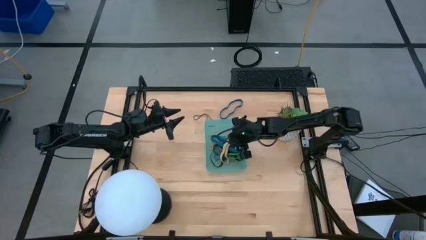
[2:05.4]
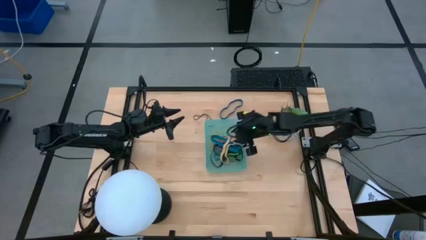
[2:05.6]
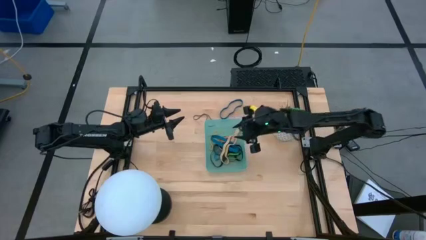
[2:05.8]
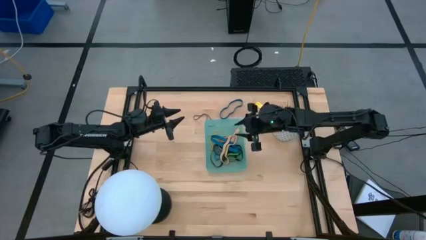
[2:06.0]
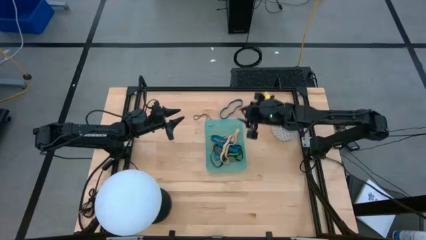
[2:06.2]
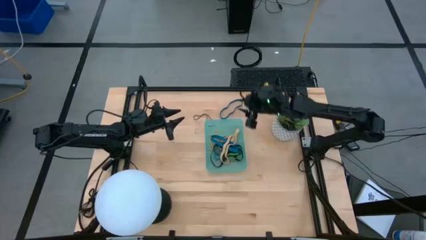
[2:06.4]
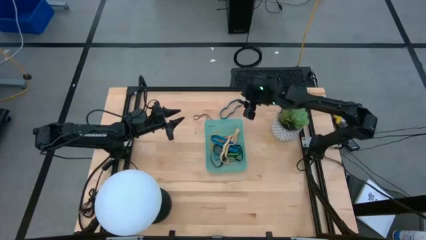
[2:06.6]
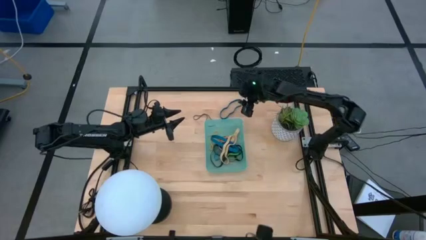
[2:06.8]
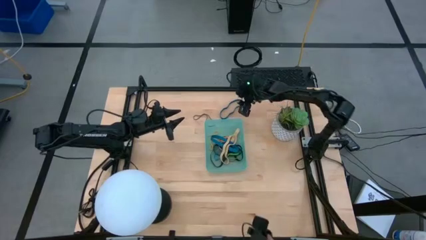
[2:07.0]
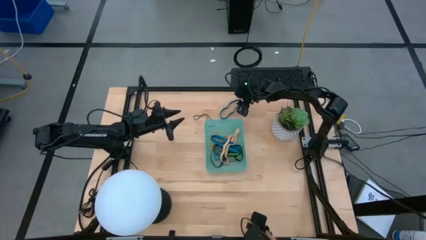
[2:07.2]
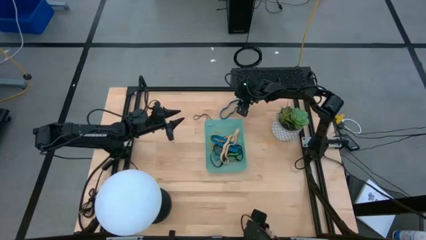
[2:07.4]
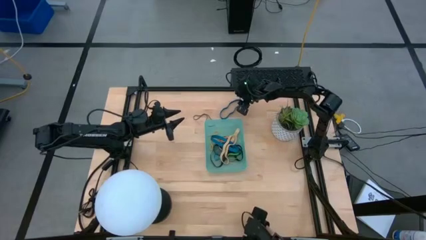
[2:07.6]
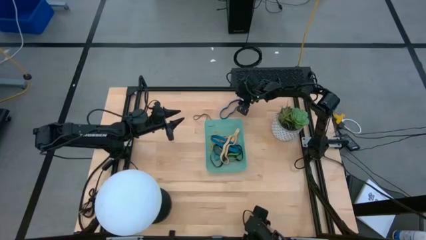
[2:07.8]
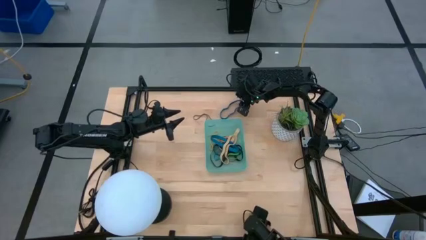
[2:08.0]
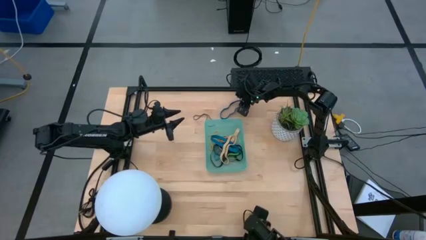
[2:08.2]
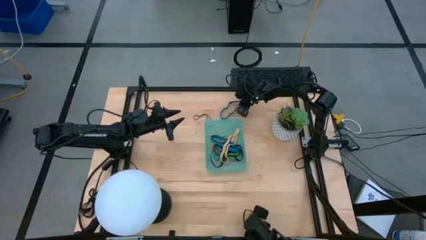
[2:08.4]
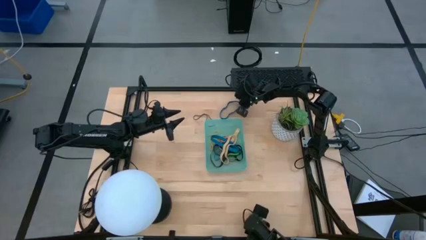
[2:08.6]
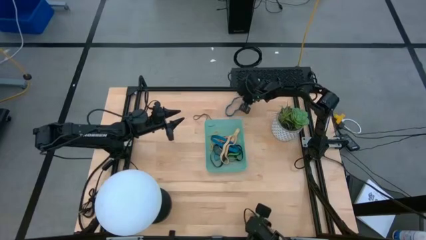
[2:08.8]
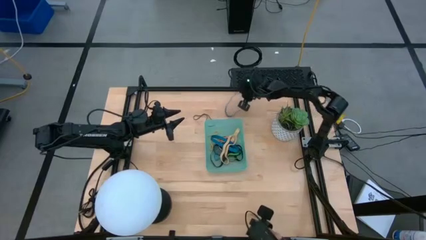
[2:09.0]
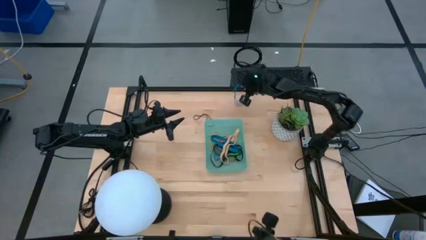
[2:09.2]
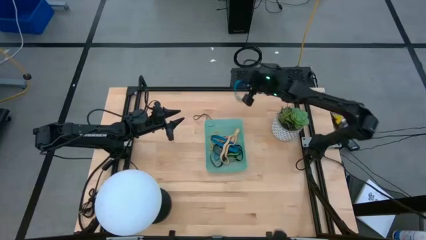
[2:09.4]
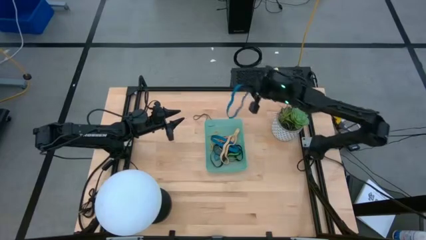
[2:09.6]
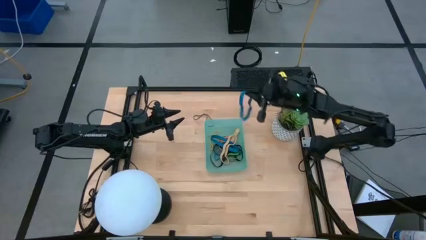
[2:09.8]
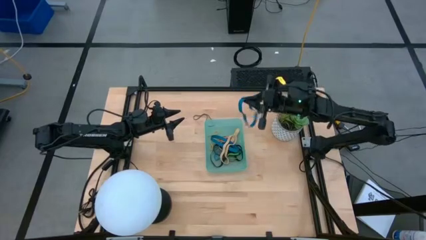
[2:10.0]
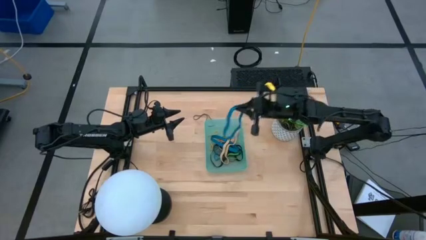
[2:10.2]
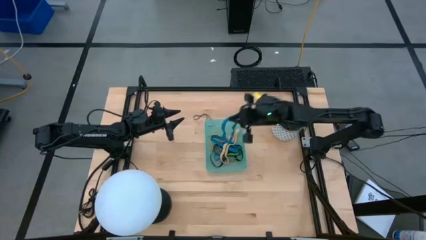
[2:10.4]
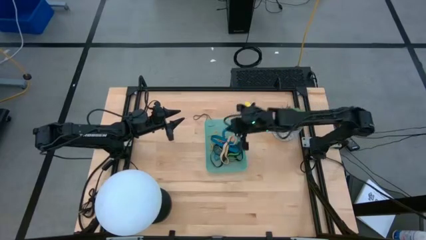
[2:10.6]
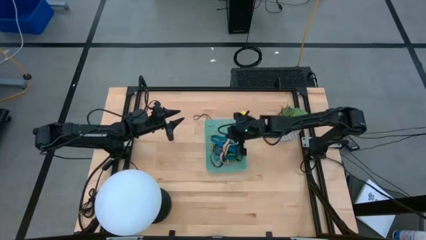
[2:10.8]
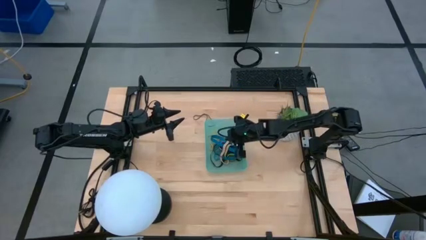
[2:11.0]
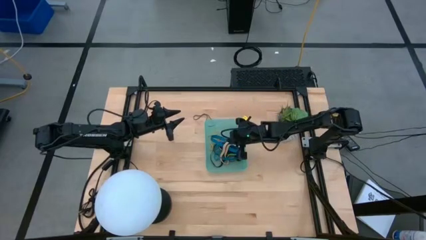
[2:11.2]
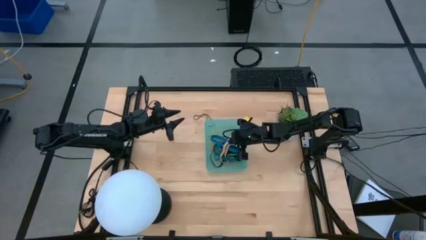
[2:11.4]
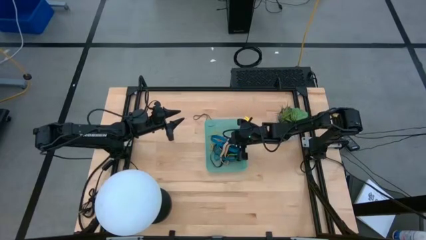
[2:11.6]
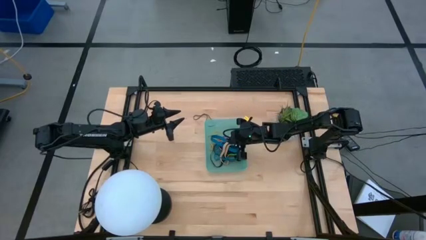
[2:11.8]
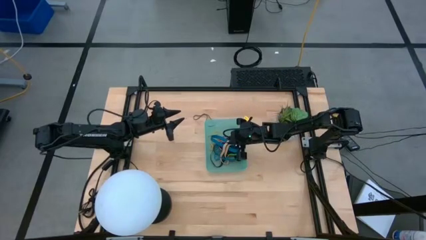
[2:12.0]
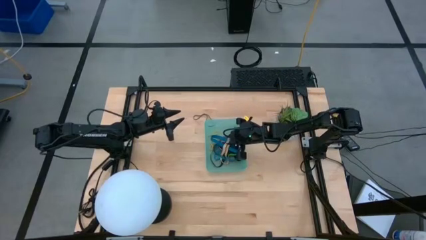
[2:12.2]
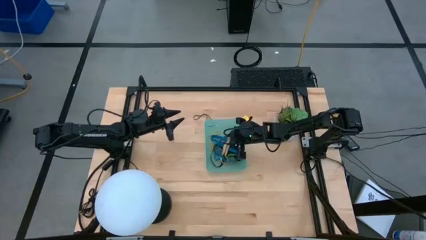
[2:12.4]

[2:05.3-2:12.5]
Task: Pick and place rubber bands into bin
Put the blue rubber band into the green bin

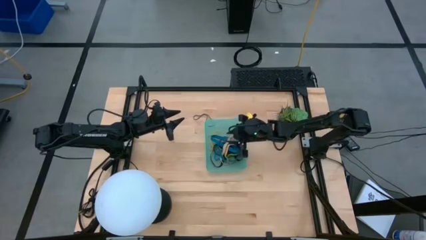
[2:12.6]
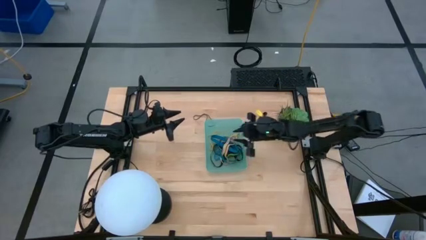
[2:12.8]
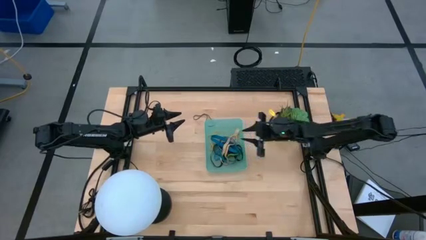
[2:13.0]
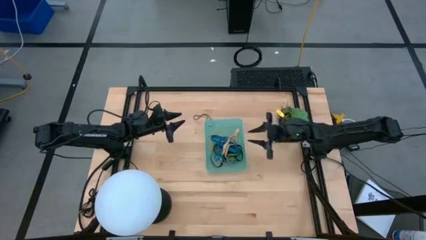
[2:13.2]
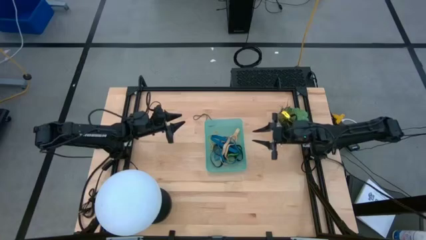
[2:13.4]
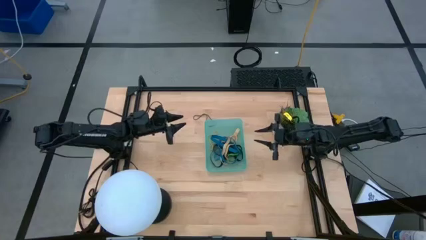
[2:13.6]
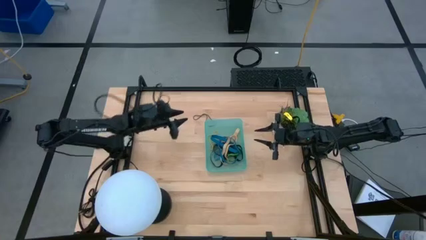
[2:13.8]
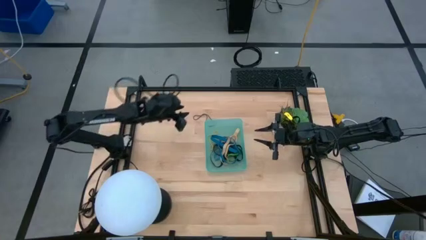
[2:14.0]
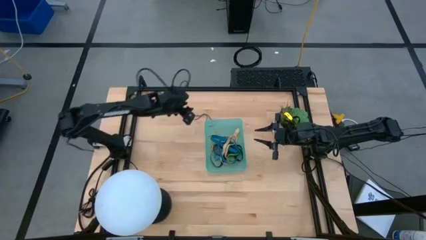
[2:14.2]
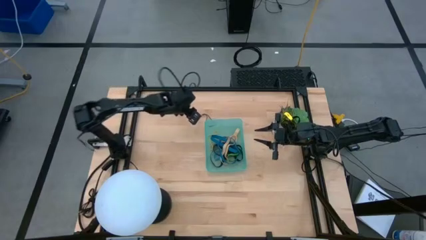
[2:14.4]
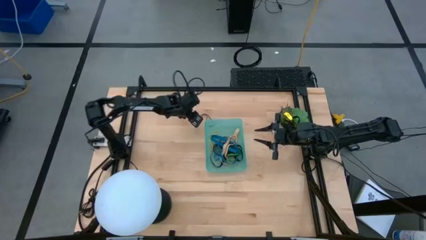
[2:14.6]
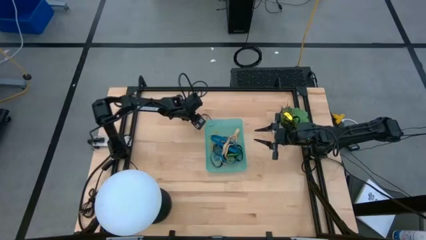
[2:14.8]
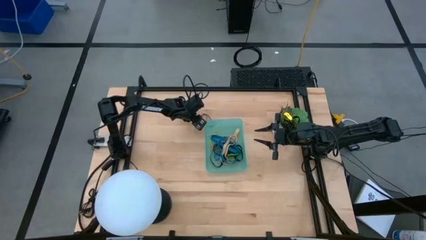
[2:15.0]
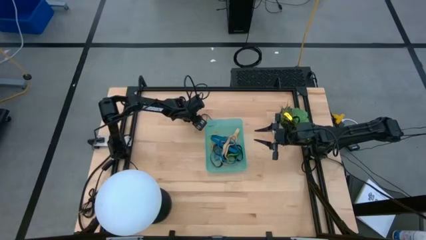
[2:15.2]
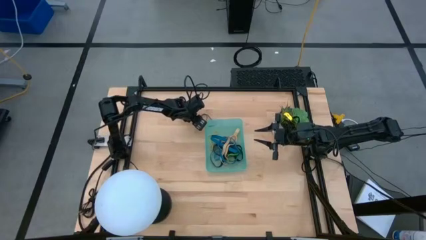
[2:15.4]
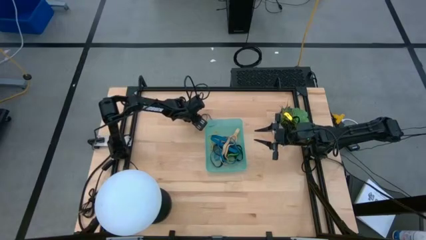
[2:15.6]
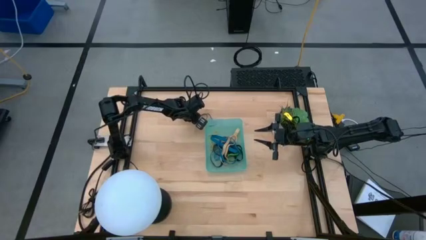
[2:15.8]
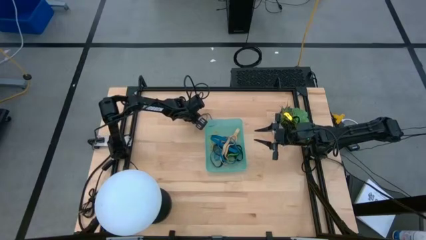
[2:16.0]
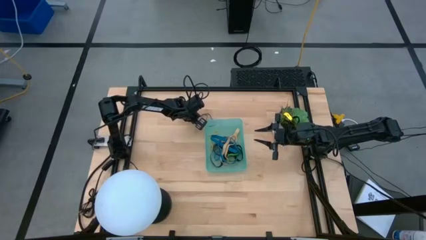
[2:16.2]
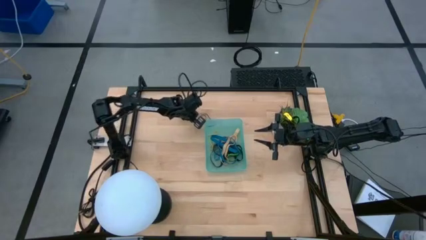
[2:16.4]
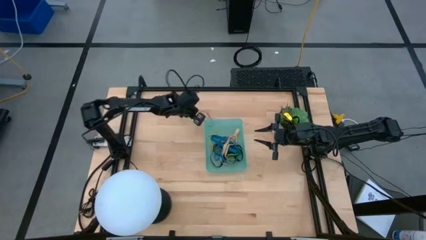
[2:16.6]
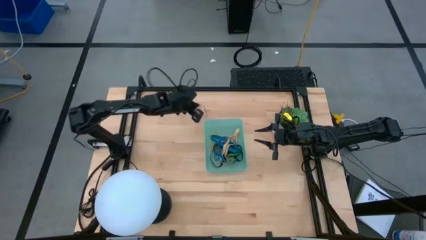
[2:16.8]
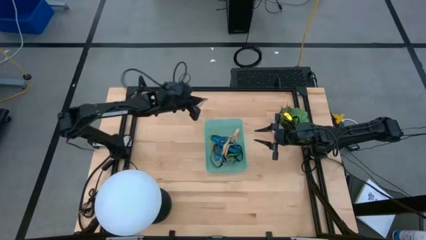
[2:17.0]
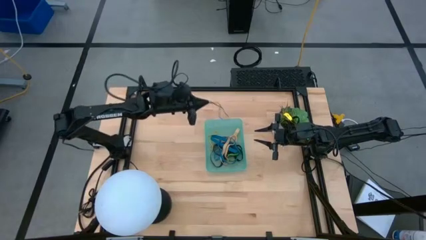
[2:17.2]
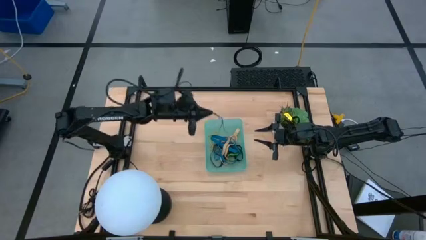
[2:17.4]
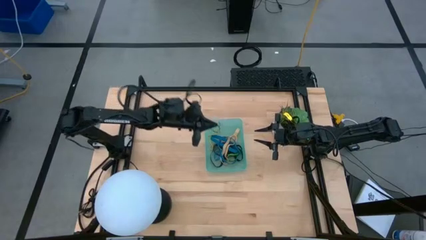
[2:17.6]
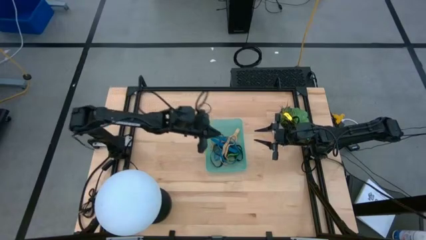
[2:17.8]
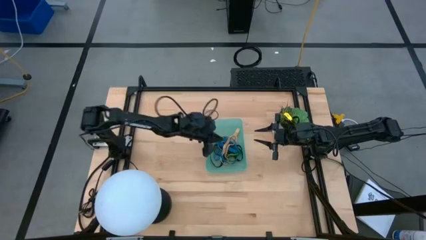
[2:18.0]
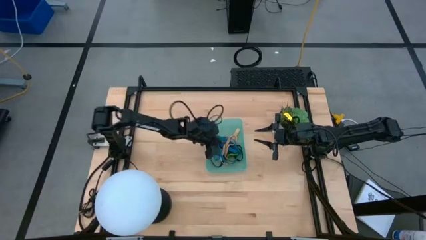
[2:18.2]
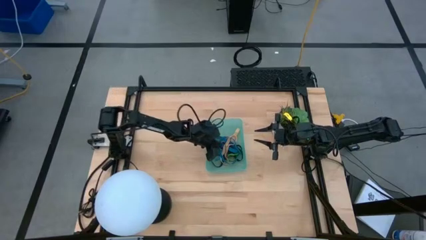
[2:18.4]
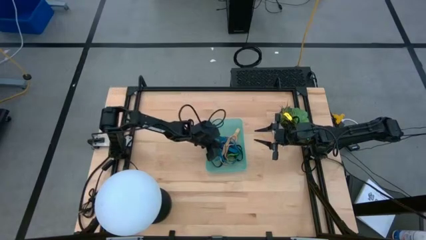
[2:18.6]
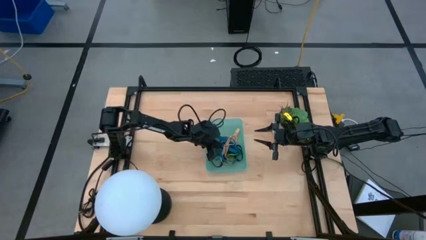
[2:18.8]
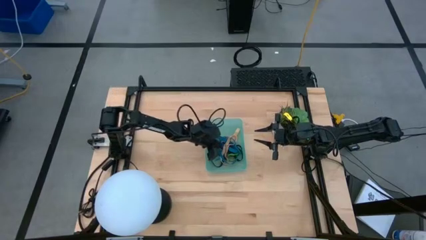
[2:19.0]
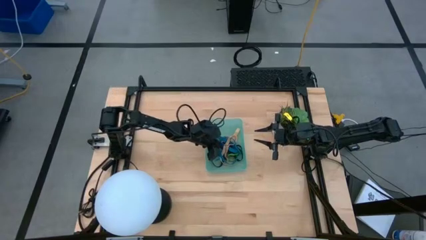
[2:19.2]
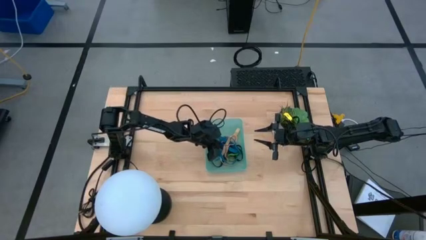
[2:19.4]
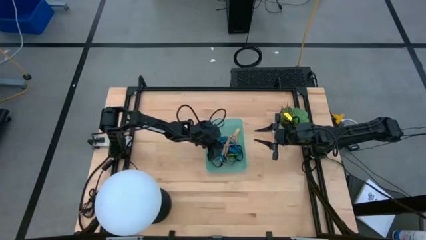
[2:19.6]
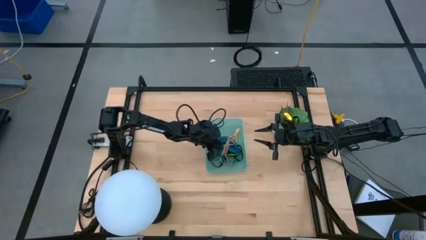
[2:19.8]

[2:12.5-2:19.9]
Put the violet rubber band into the green bin

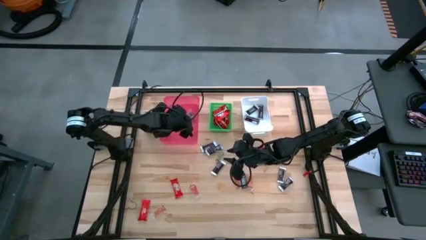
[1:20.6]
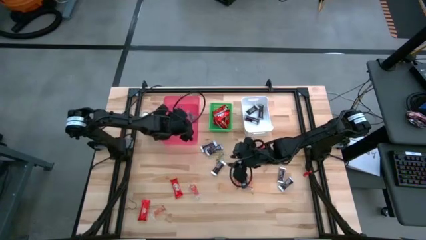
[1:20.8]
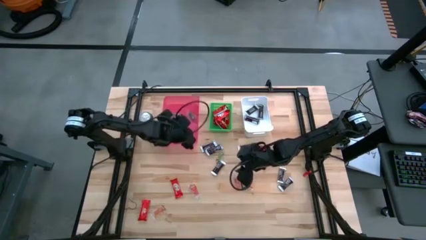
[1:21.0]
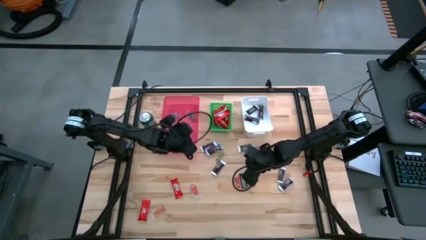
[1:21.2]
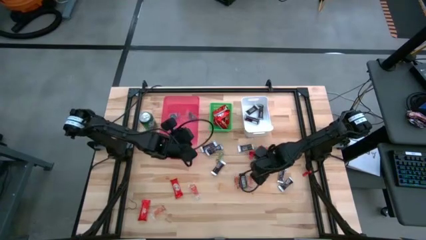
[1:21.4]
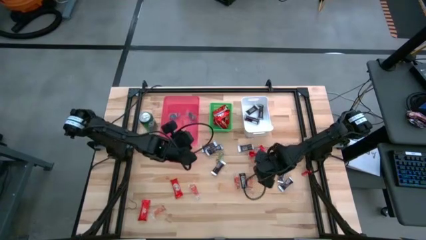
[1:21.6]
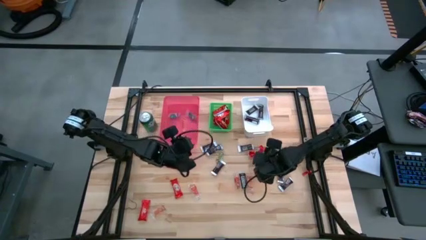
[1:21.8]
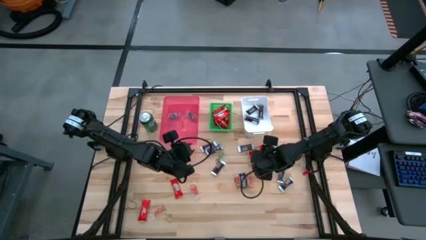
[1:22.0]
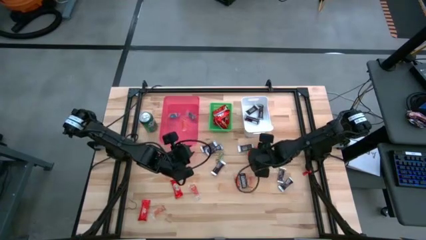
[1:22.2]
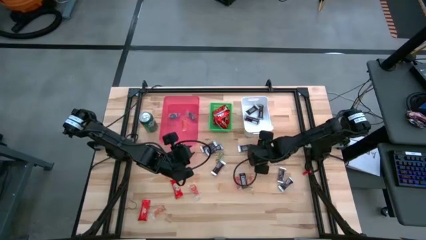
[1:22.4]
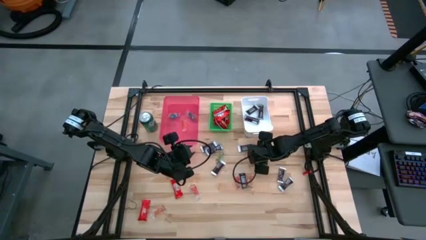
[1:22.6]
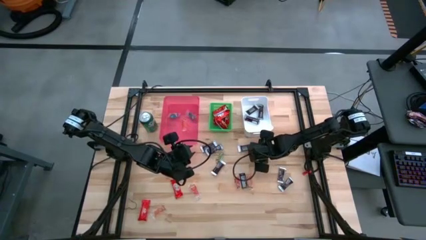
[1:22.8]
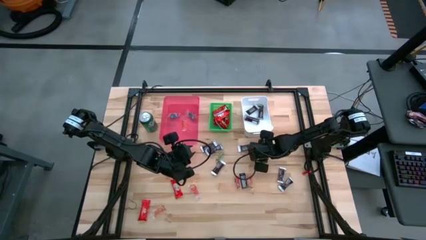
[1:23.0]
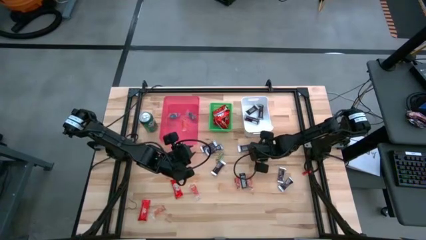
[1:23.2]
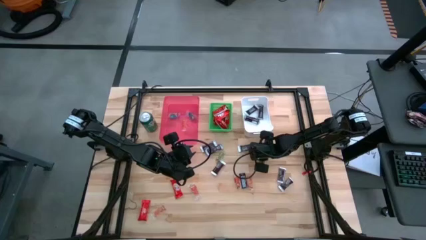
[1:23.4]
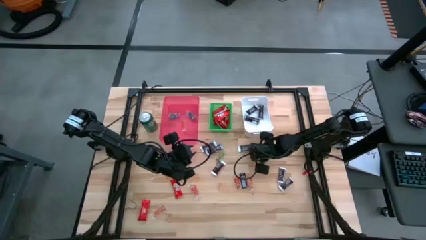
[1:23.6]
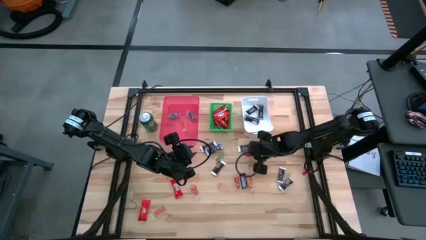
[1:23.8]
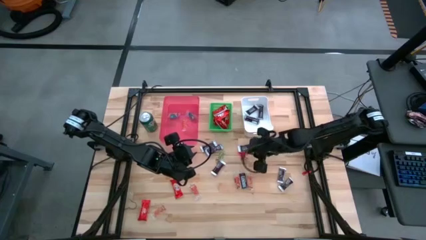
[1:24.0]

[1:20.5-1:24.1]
Task: Sort candy
Put the red chocolate into the green bin
